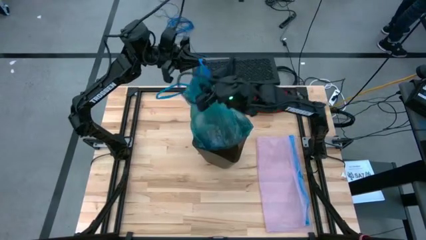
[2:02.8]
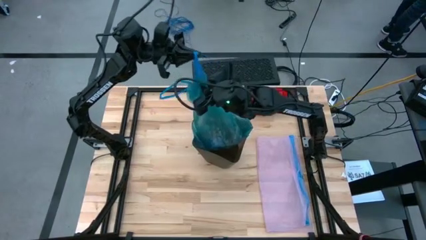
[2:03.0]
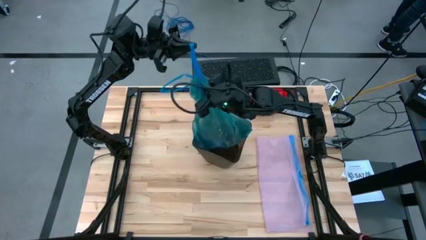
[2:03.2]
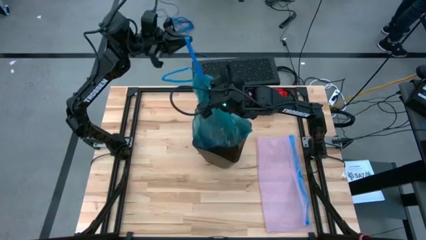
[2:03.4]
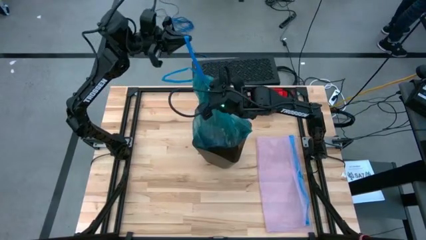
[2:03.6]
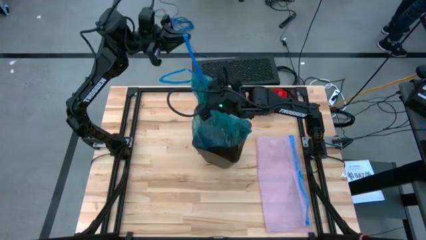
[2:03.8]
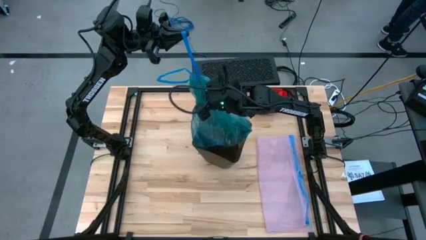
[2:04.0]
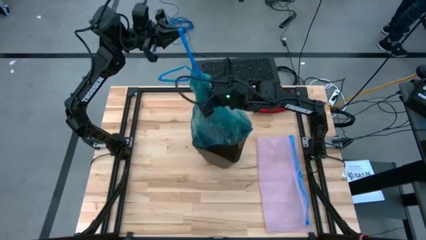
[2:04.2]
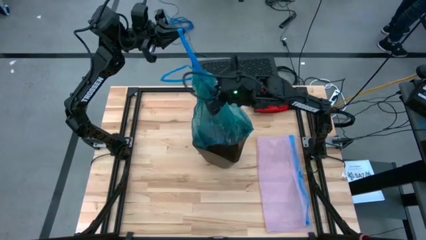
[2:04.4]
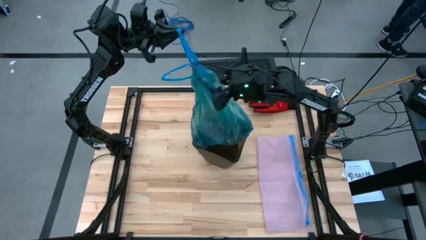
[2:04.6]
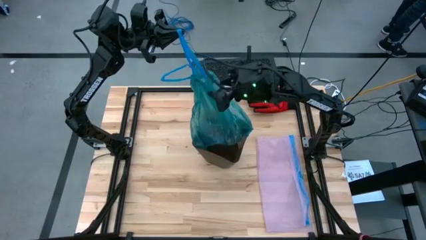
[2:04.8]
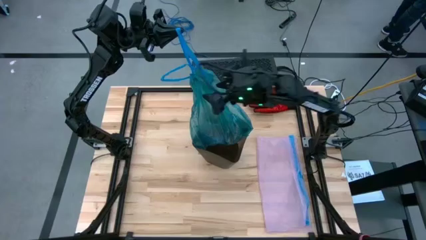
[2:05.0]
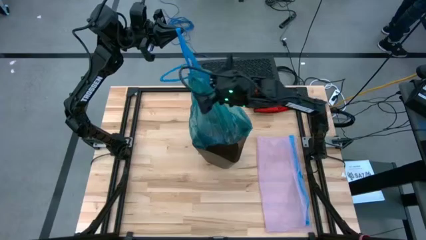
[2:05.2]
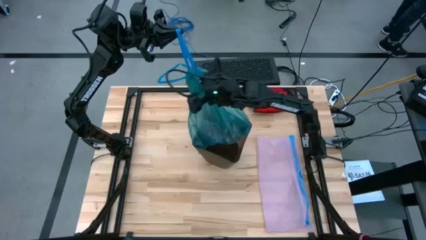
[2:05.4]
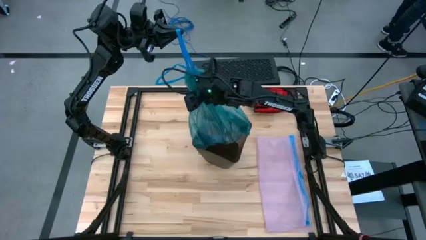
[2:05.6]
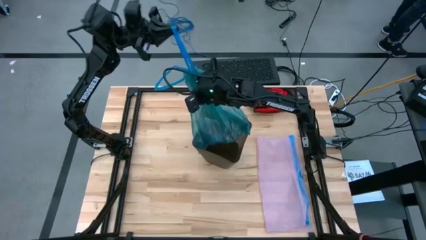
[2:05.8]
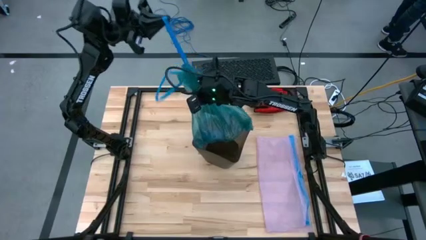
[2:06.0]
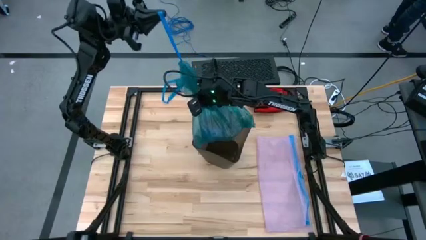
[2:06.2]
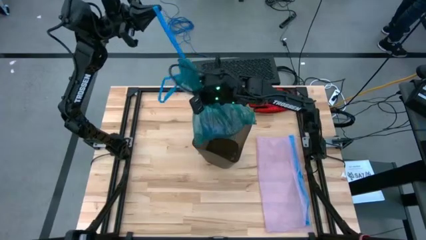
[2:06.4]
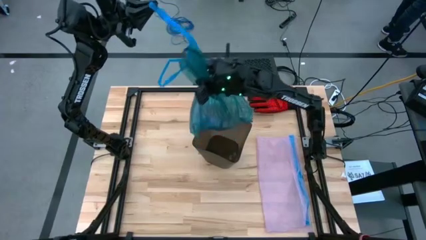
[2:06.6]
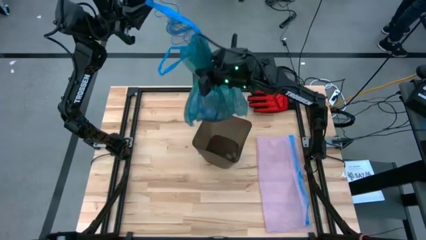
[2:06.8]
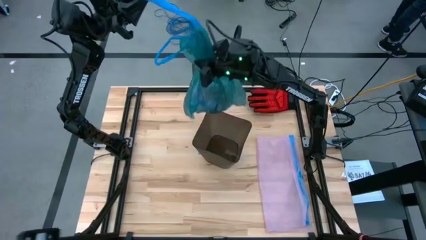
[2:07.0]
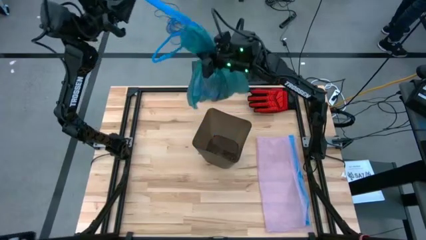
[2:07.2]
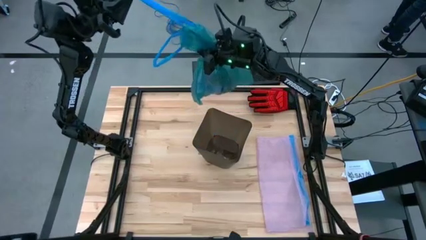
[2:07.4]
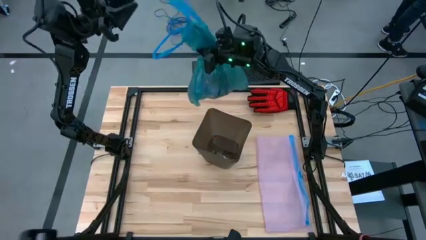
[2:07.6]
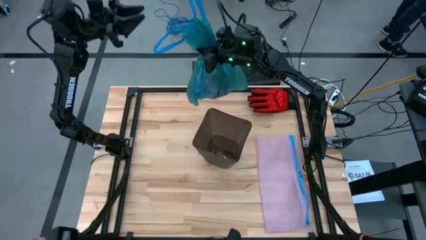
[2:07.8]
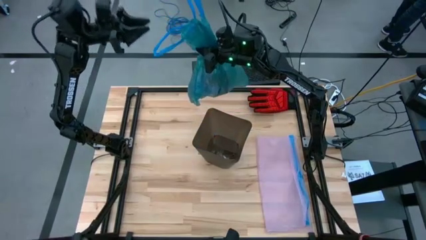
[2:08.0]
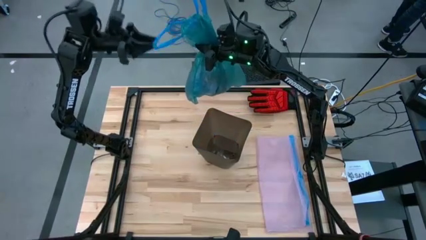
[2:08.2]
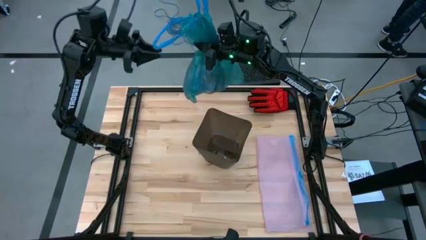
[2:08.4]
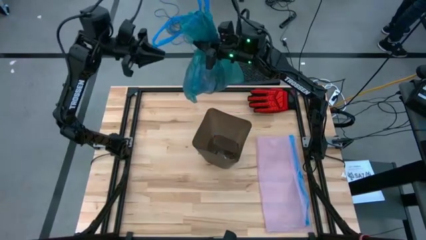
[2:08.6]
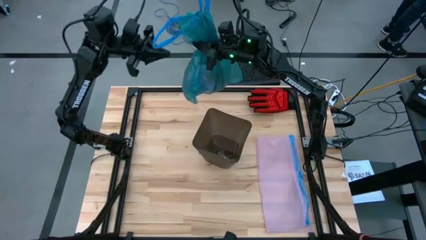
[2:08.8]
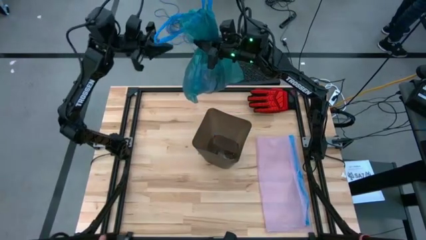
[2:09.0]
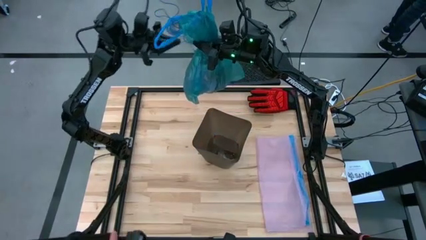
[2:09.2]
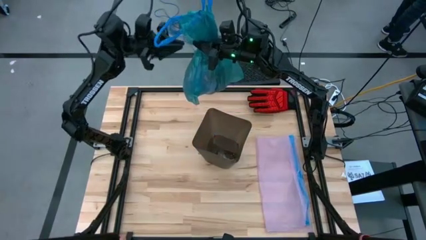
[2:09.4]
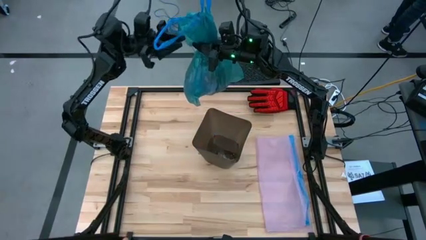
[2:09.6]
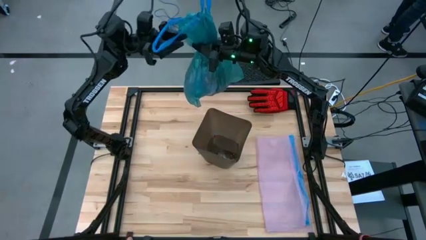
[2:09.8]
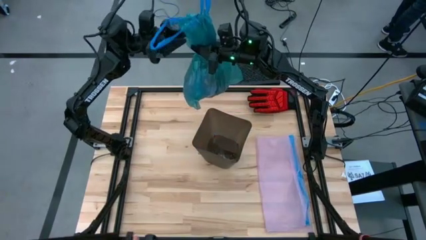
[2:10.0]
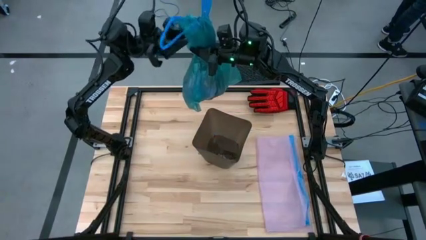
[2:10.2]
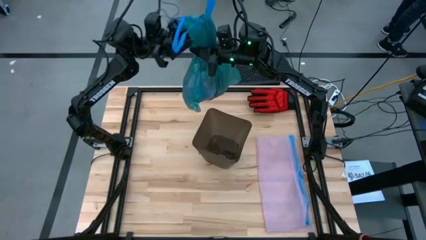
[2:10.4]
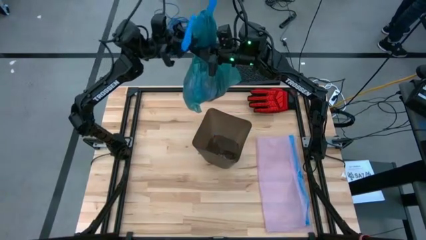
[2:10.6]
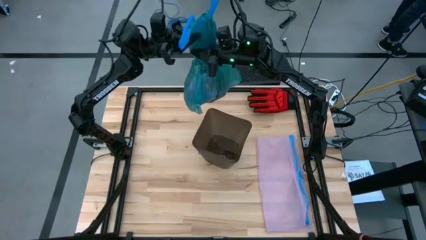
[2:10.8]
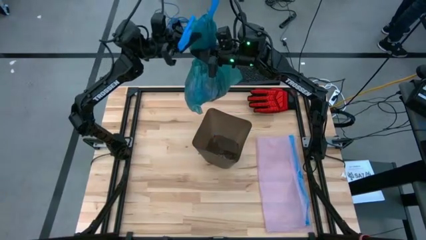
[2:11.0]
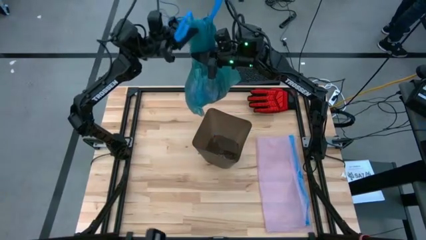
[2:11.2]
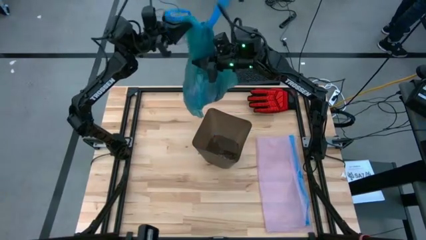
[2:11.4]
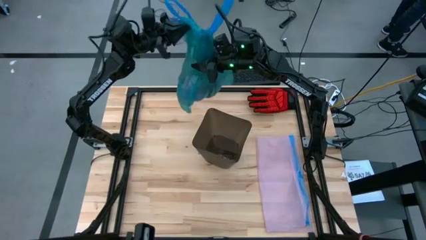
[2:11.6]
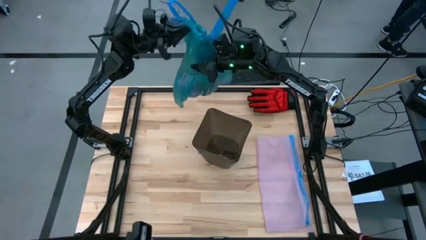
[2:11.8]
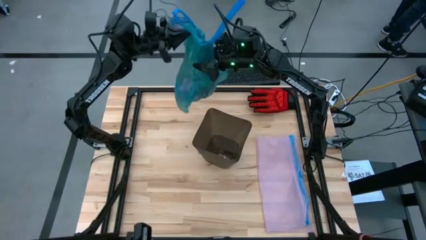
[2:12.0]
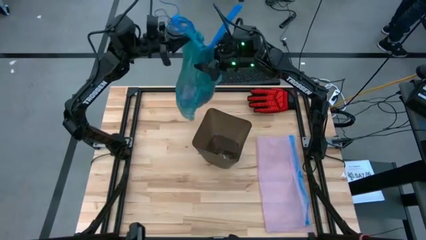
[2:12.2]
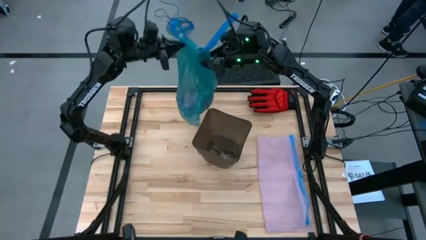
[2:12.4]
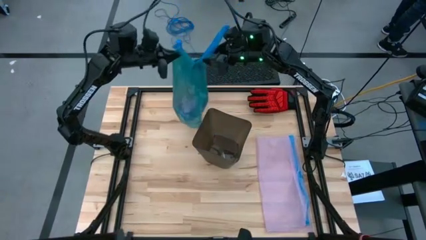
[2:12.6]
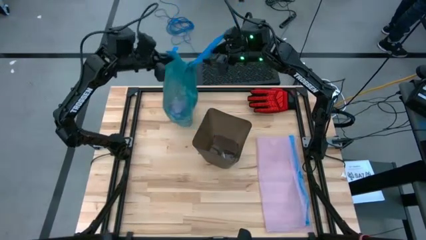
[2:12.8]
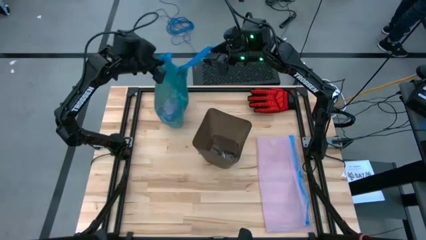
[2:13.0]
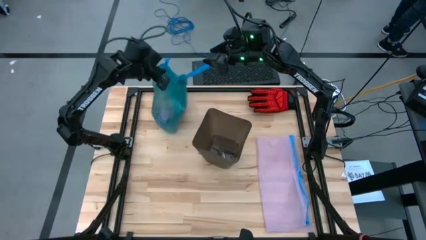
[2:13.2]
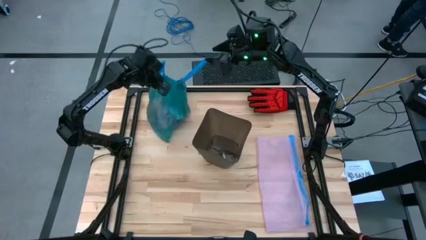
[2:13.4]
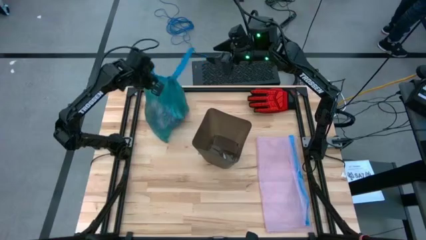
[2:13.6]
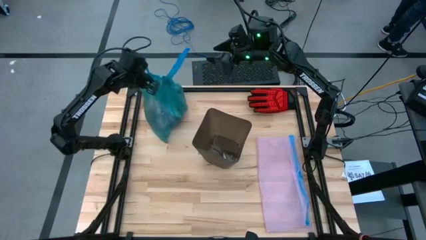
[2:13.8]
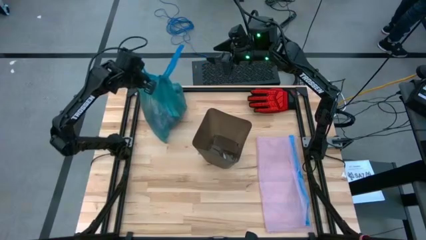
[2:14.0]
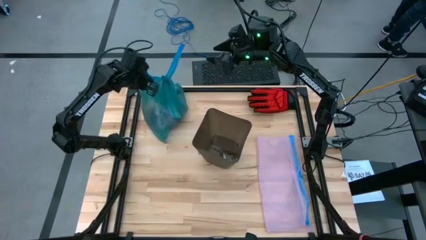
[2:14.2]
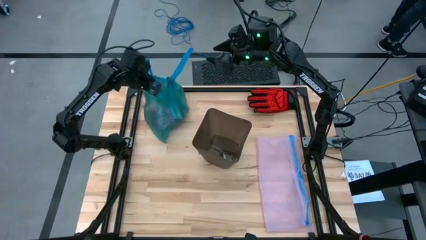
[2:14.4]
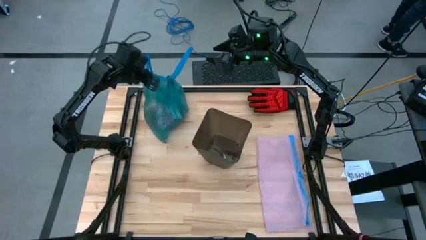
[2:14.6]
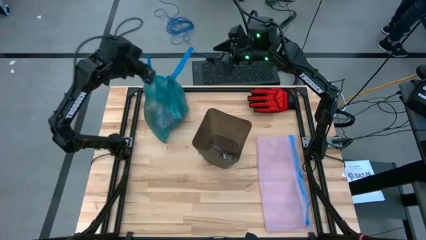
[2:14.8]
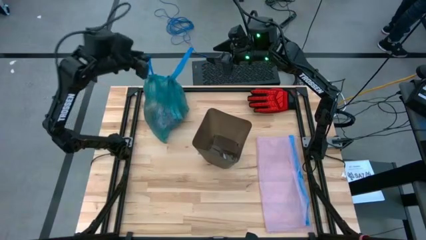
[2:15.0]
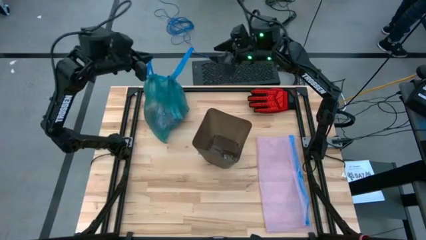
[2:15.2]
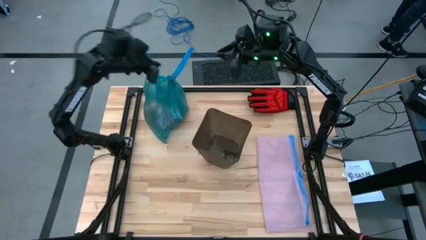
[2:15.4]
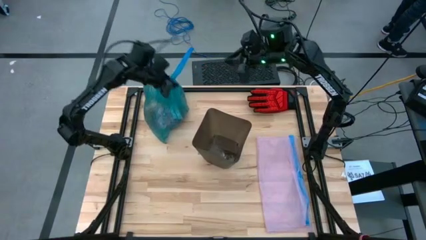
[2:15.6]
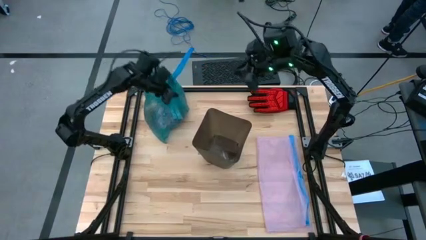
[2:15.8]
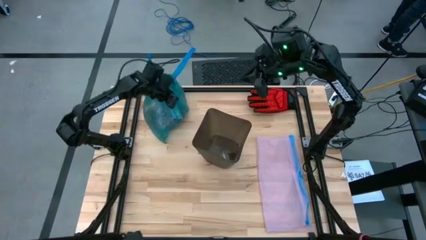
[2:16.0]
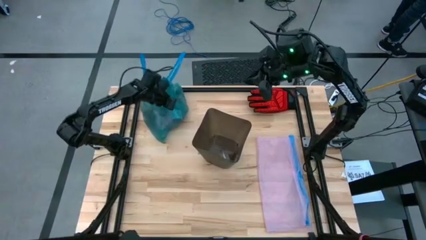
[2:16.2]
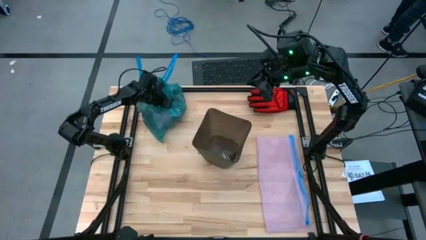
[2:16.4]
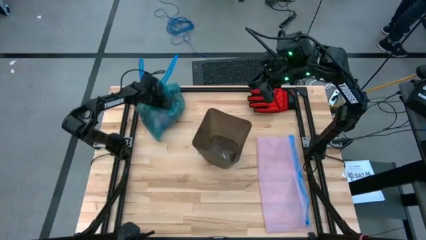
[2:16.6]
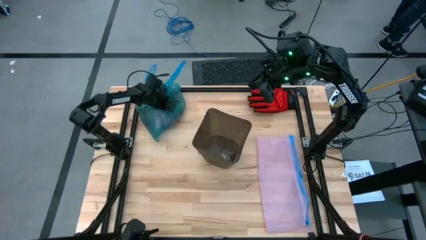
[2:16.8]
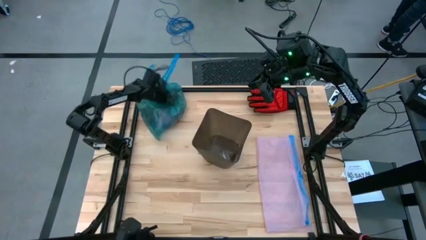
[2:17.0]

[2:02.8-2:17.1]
Task: place trash/remove bag and relplace
Remove the blue trash bag from the trash bin
